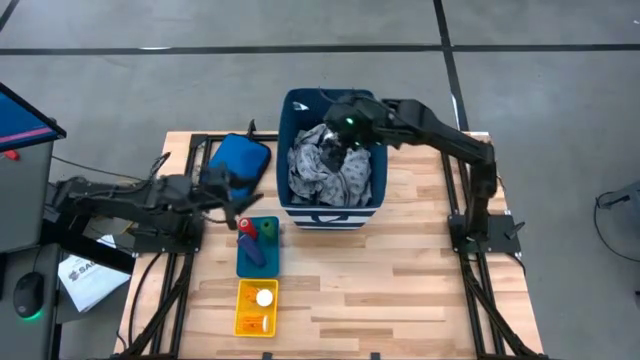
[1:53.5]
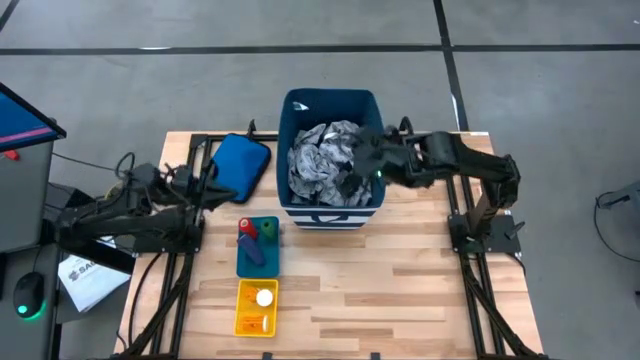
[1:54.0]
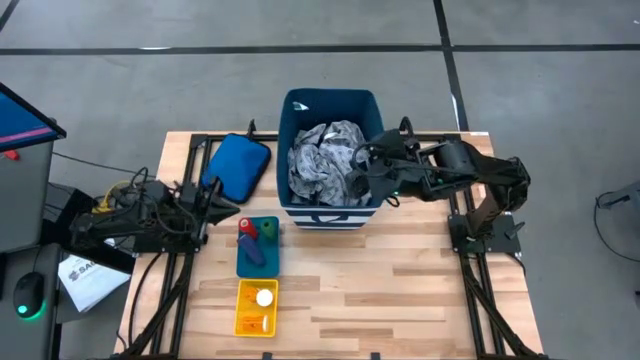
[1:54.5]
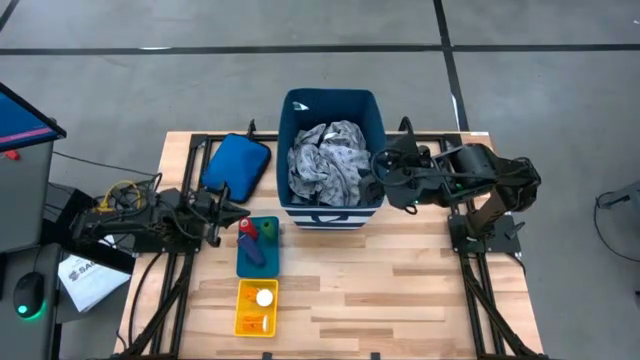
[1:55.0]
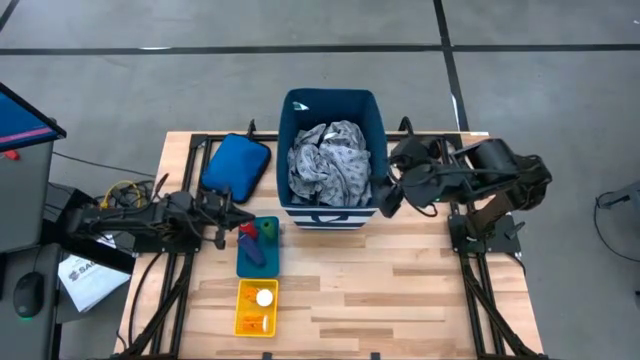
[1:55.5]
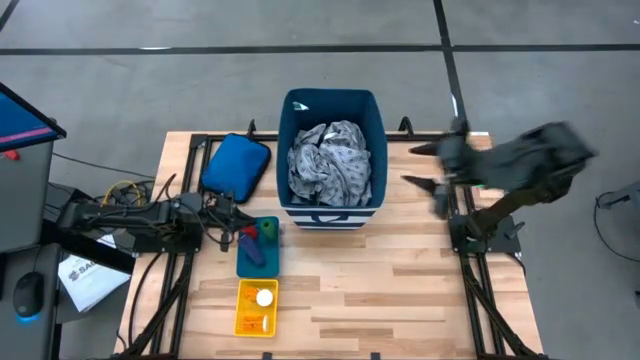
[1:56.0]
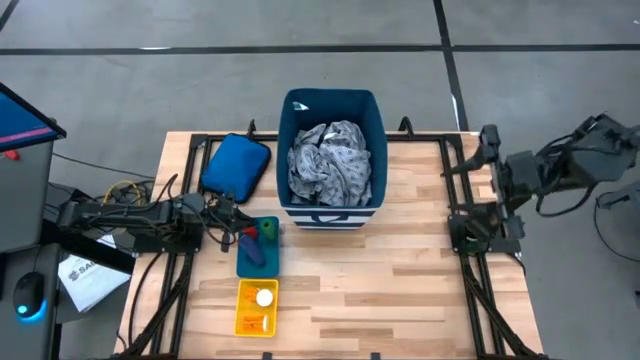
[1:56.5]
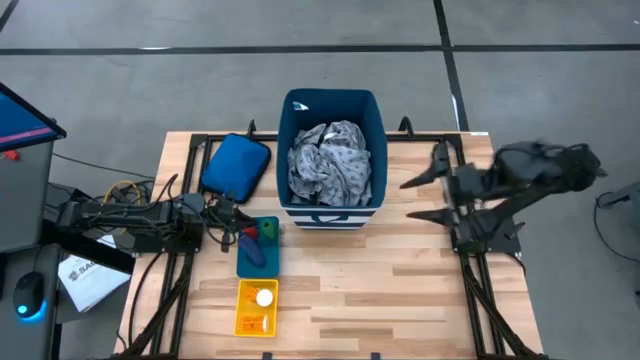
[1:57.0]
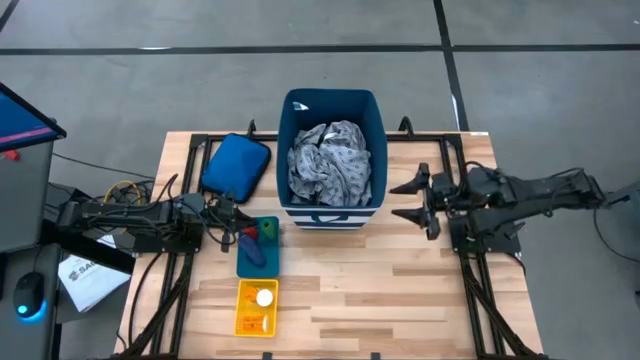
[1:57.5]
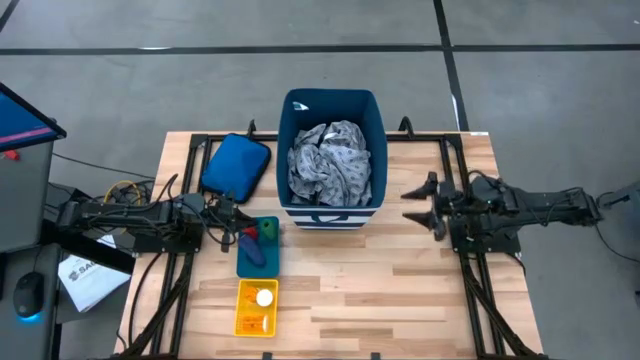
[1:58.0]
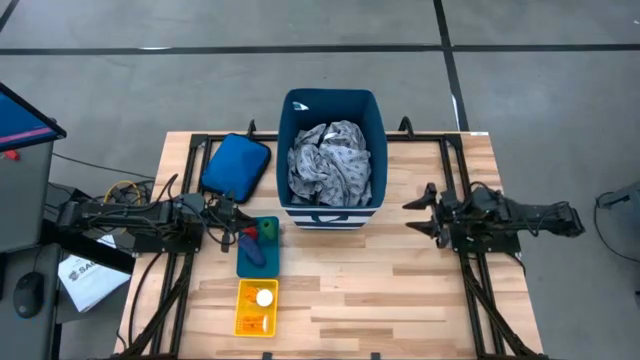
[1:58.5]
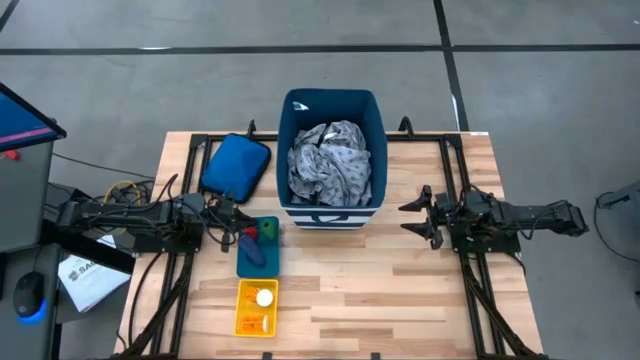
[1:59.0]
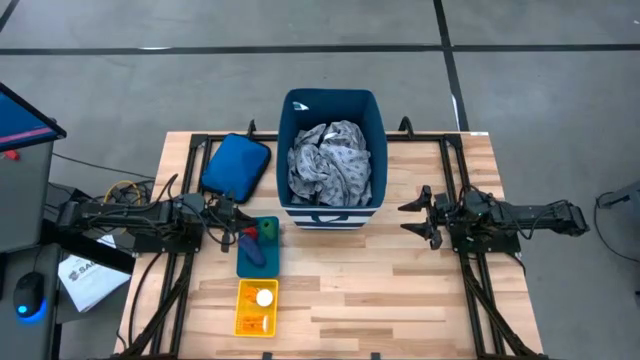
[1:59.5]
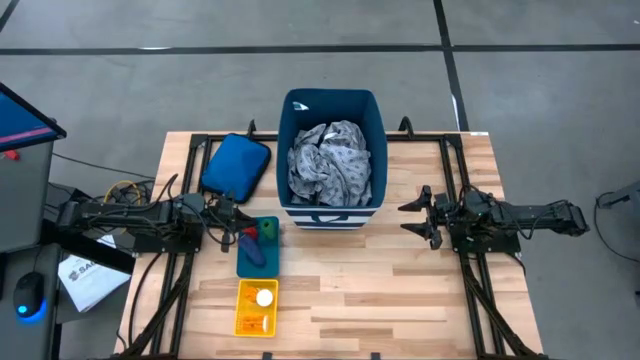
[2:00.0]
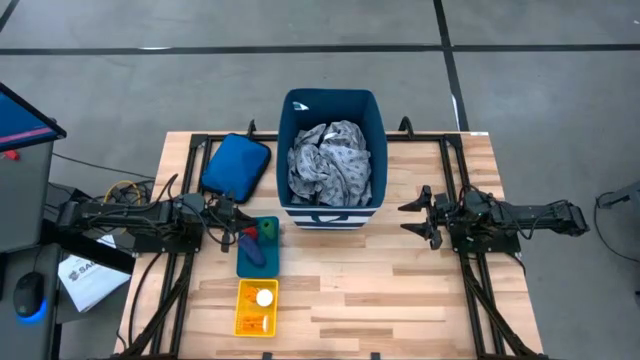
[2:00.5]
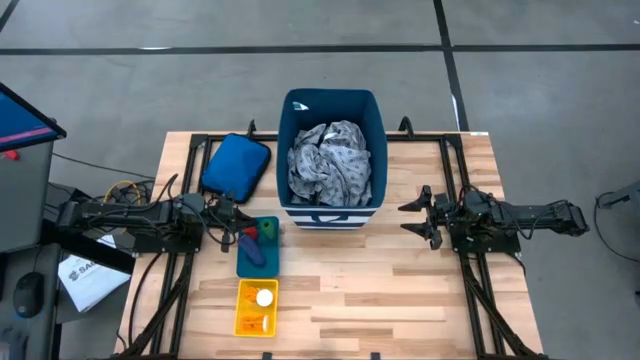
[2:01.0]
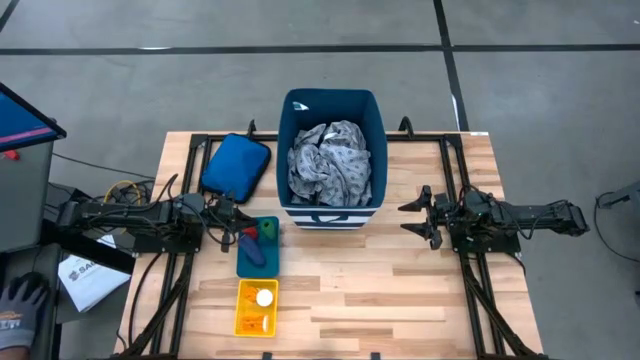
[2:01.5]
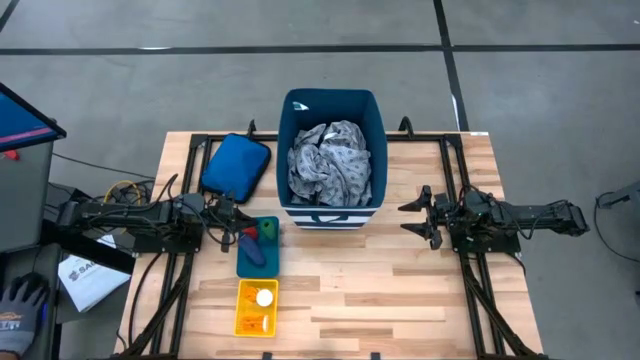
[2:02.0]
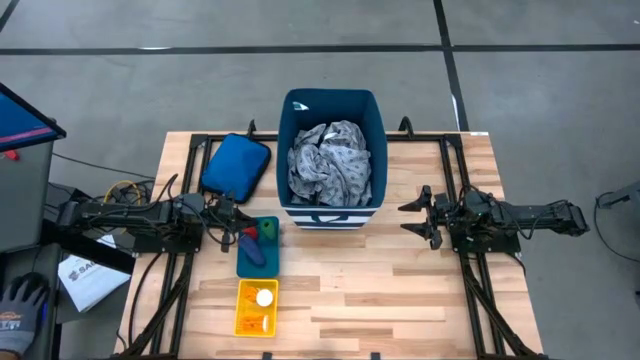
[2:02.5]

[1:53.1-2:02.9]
Task: Pick & place medical supplies in basket/bin
Return to Home Position

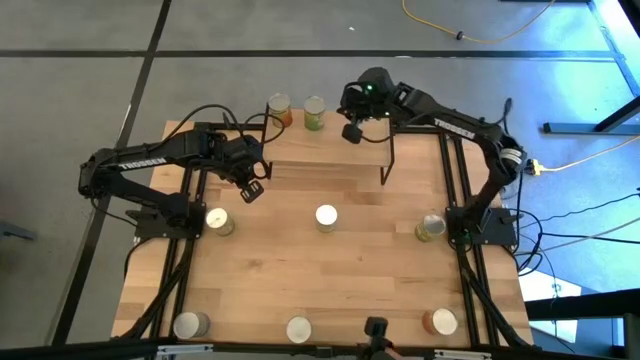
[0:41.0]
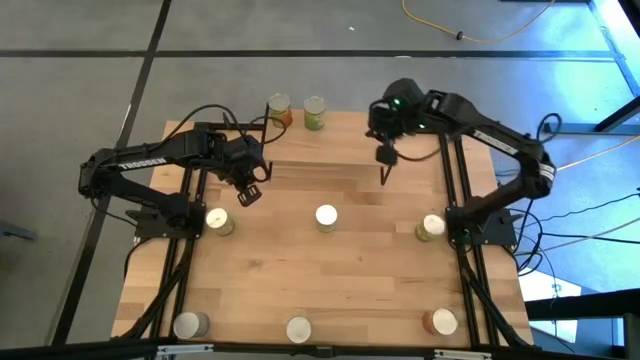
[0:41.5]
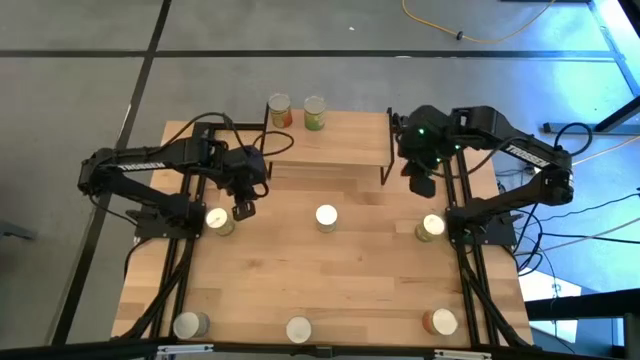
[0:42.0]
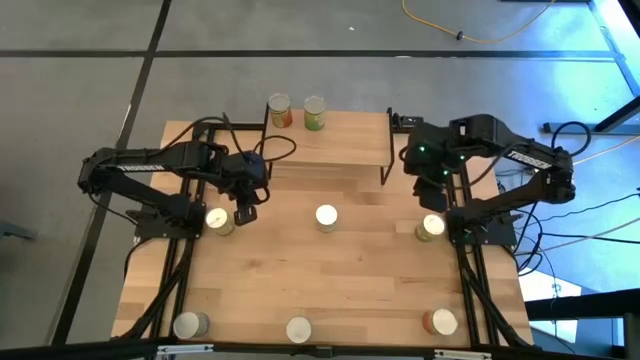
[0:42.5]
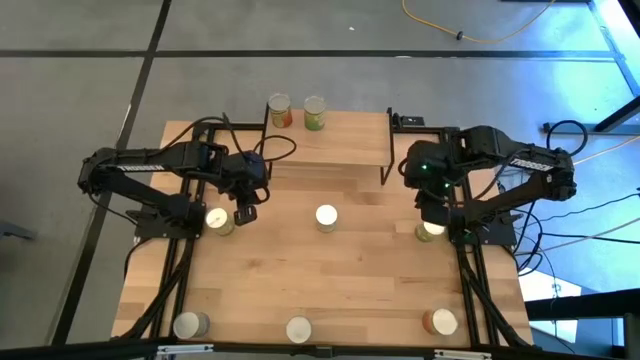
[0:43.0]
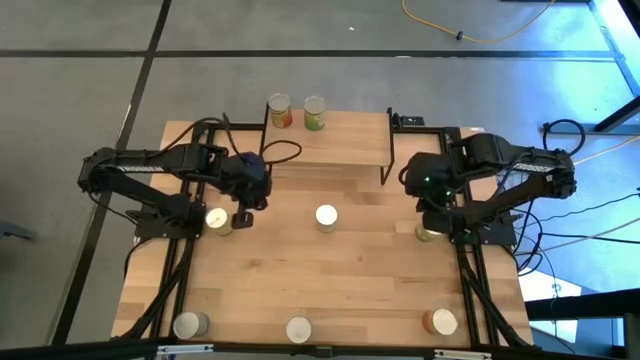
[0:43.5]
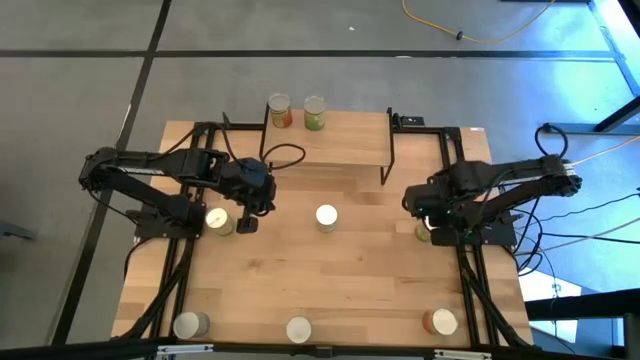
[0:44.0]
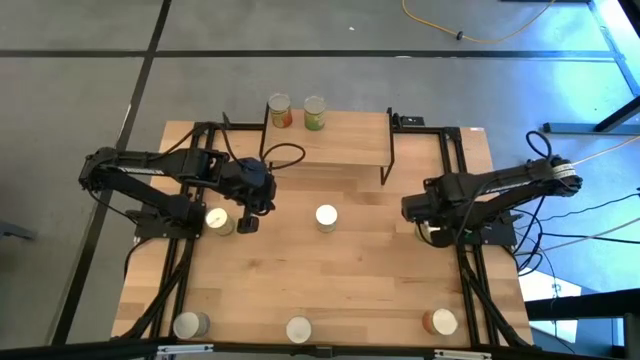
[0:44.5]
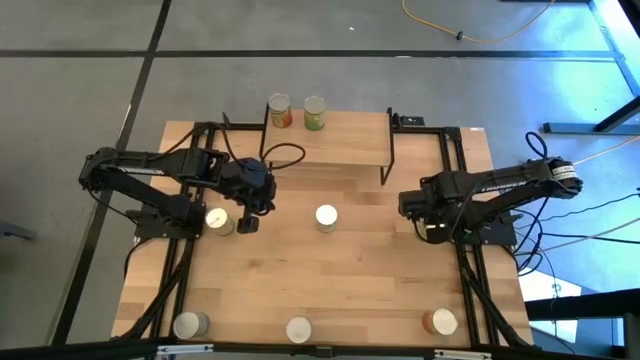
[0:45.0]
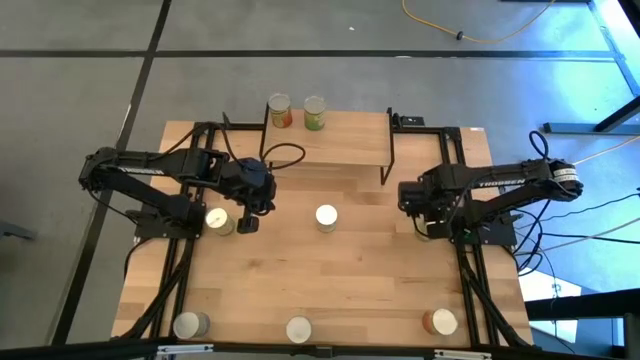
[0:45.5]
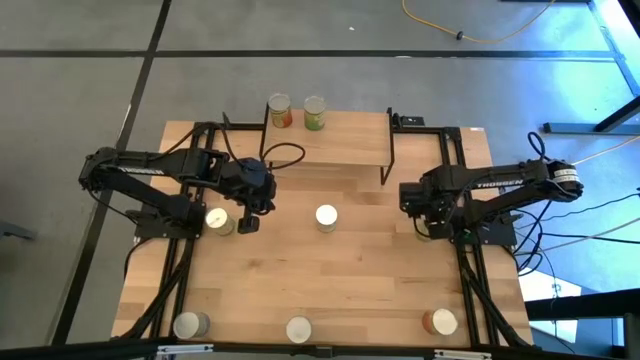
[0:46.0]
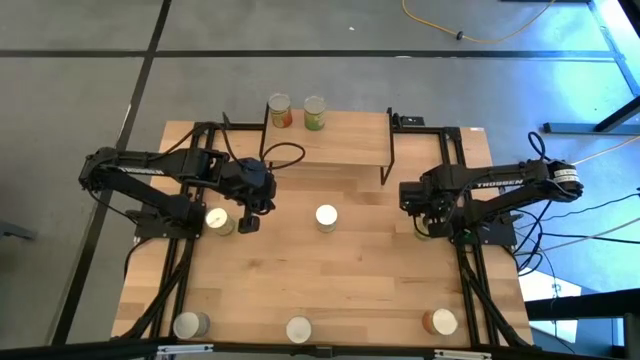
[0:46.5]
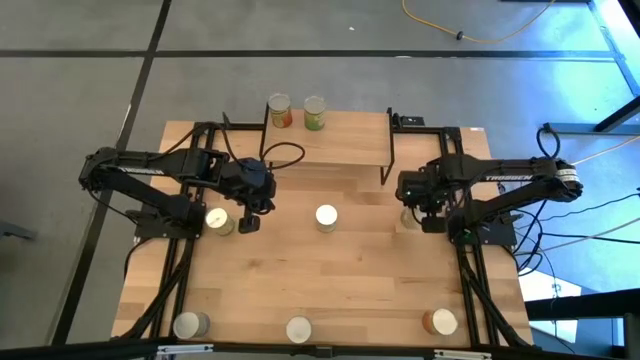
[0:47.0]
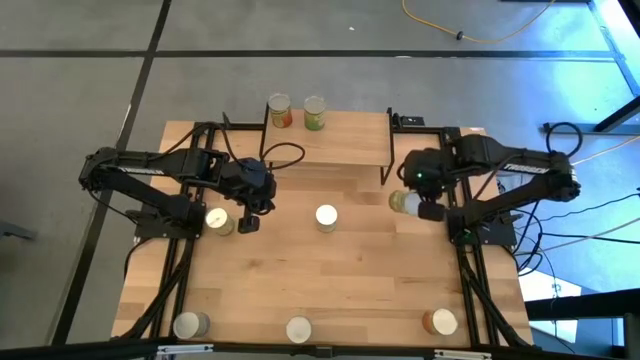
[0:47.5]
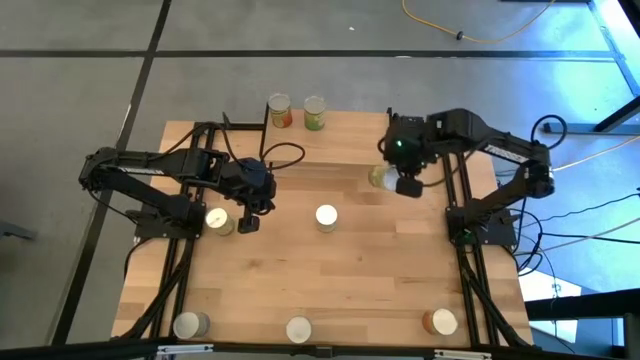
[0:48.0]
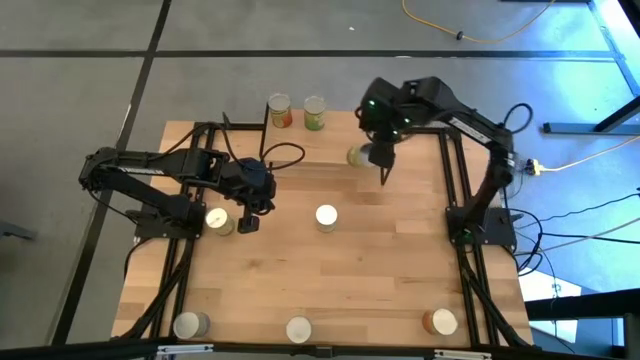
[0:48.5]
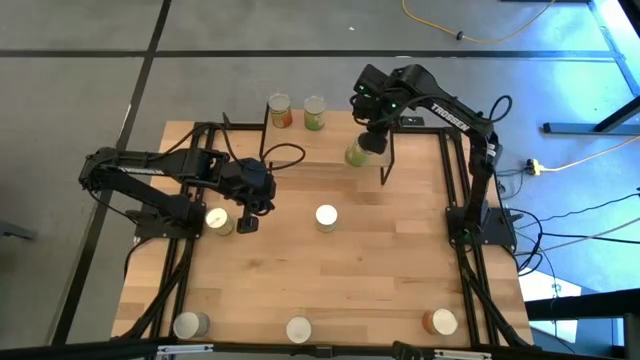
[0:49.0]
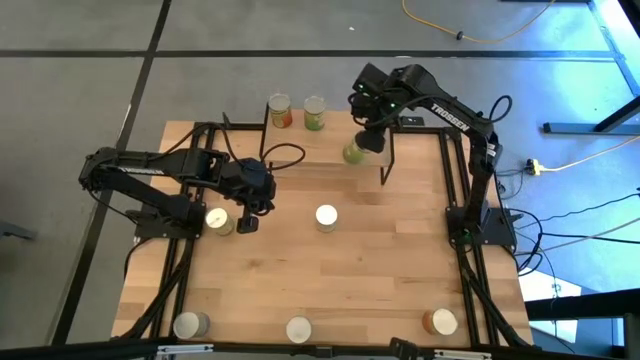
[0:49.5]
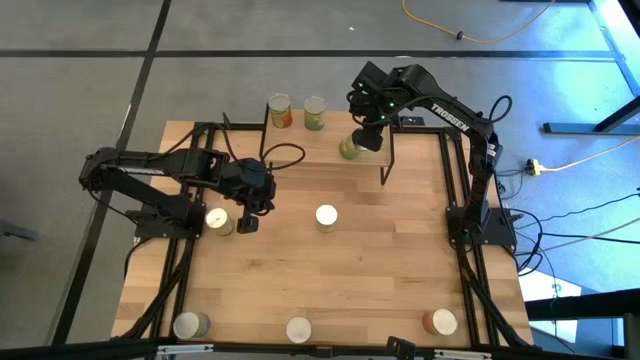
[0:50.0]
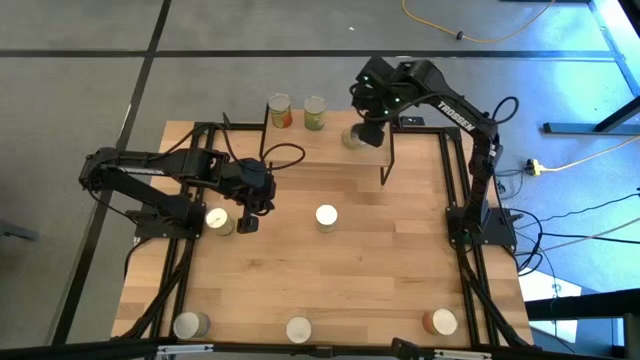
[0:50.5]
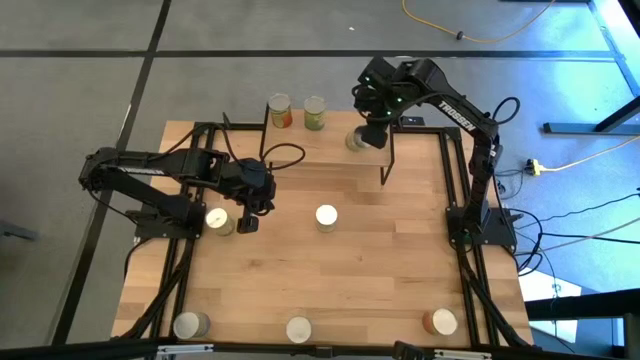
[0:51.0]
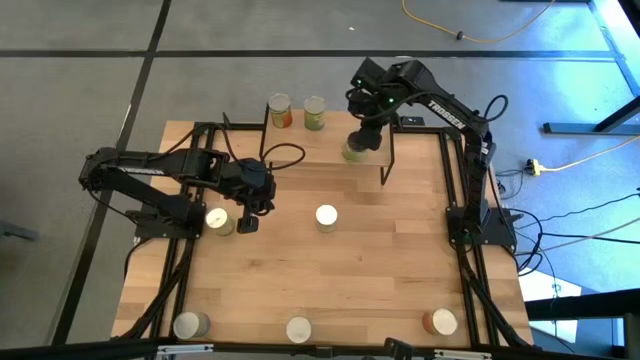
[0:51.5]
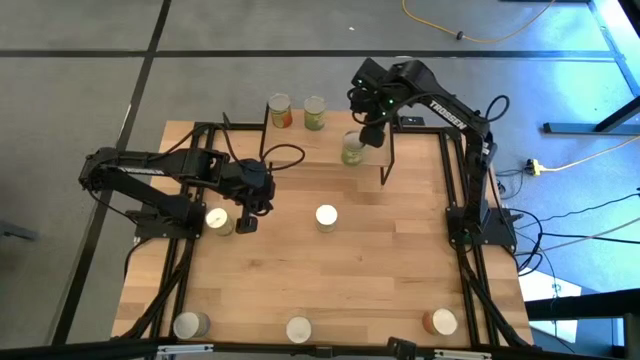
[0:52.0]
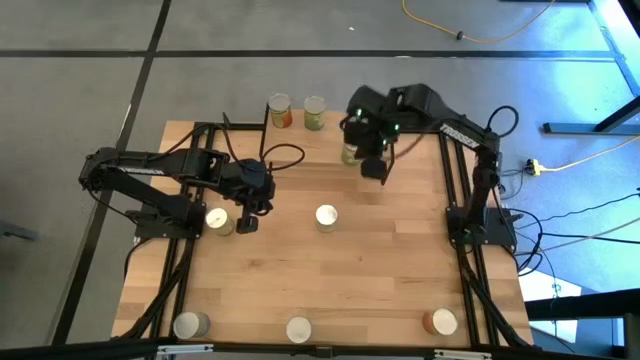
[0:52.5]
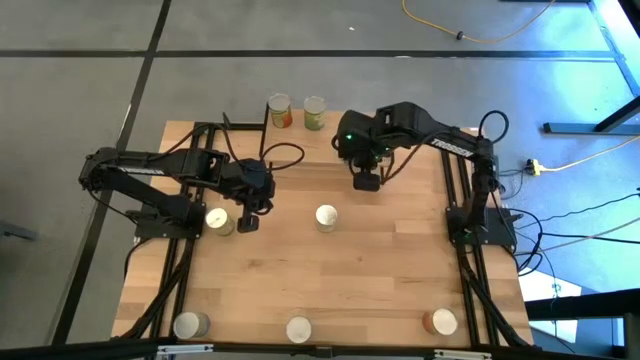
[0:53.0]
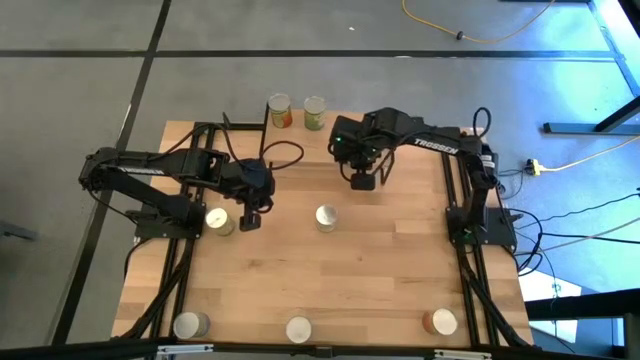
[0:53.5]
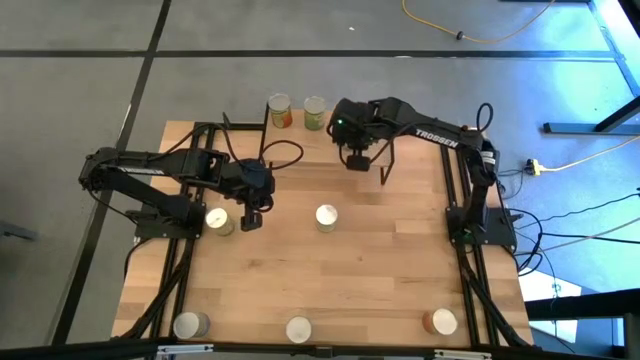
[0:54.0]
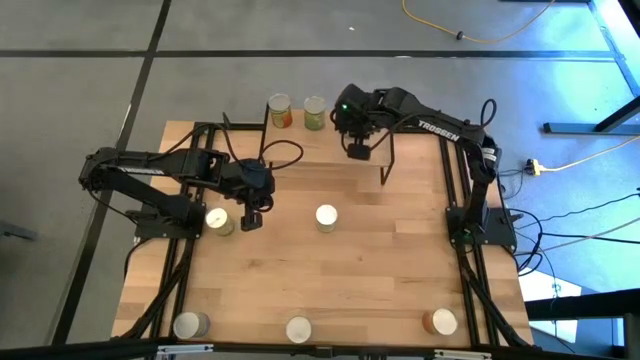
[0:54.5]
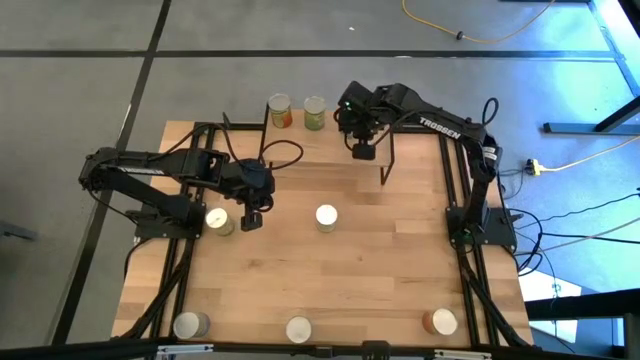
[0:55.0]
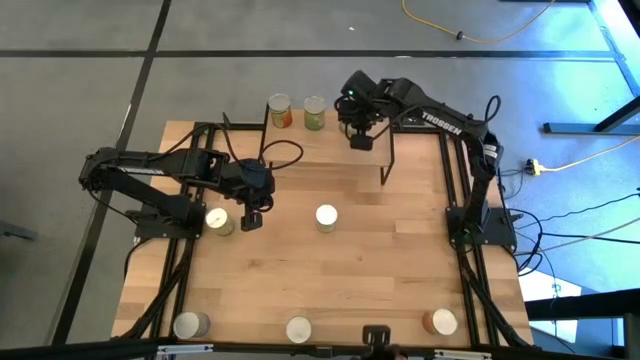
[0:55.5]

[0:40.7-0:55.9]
Task: Pick and place cans onto a shelf
Put the top canned pears on the shelf
